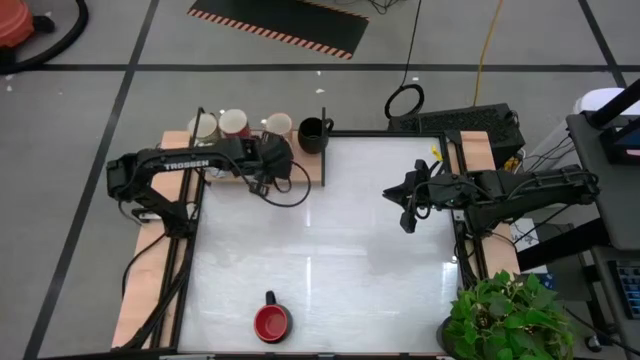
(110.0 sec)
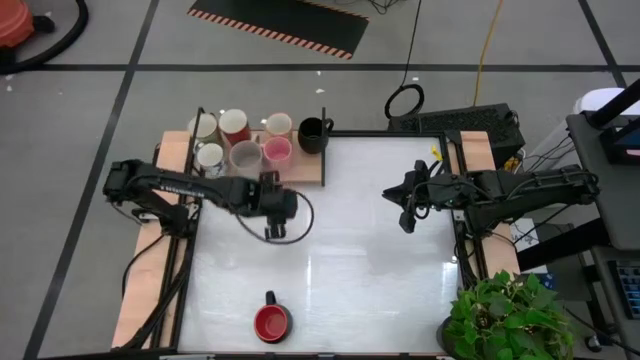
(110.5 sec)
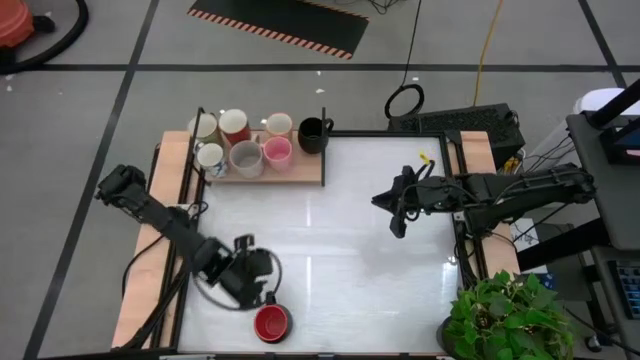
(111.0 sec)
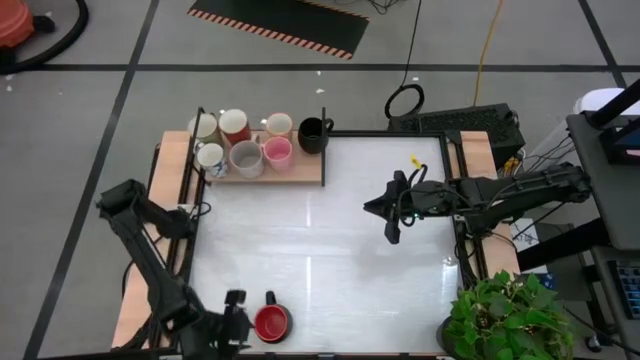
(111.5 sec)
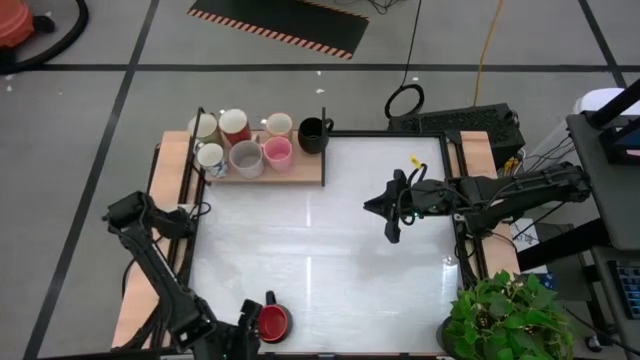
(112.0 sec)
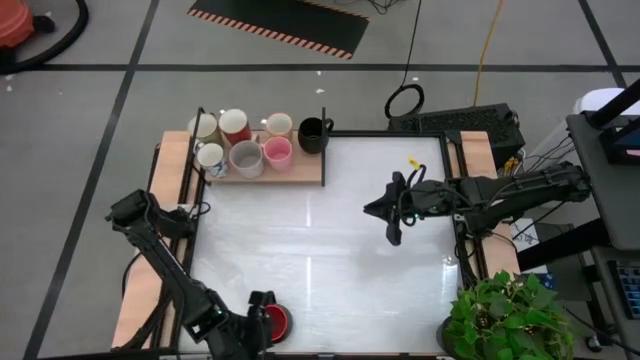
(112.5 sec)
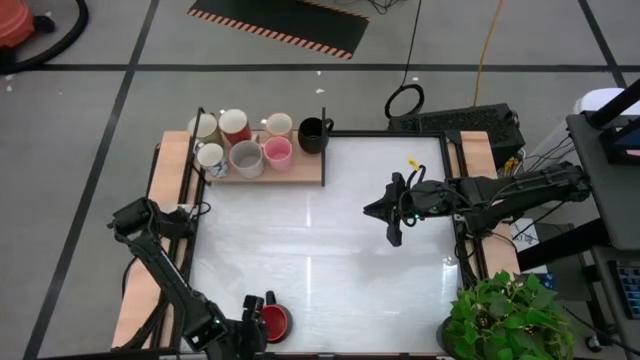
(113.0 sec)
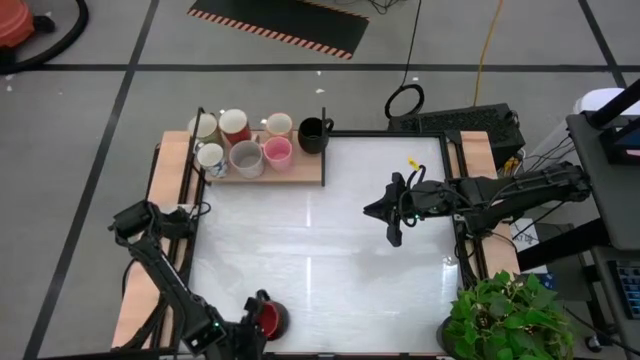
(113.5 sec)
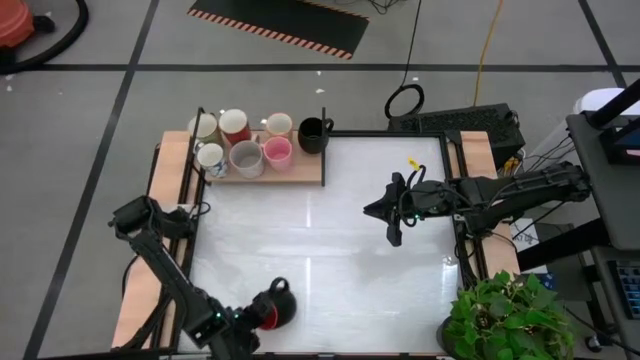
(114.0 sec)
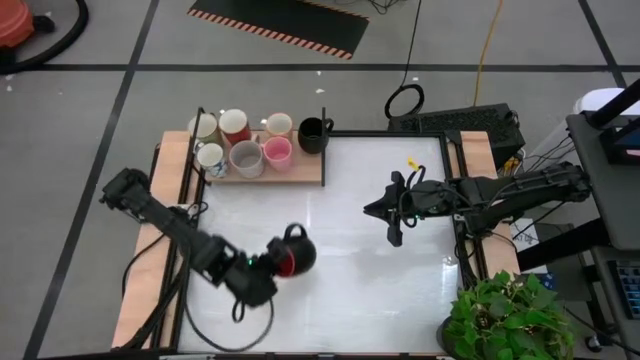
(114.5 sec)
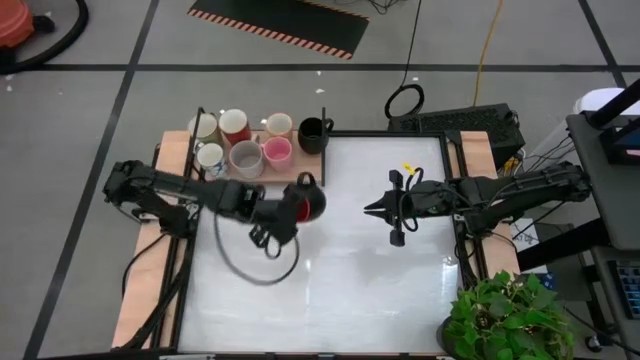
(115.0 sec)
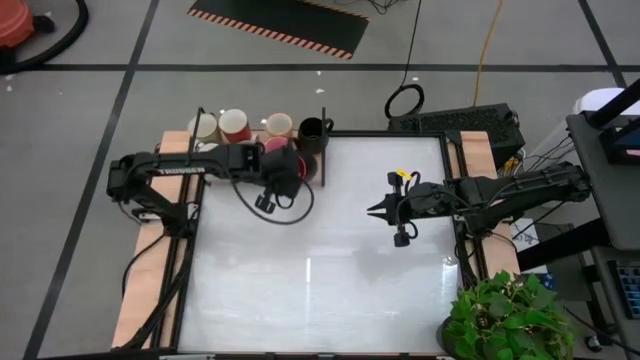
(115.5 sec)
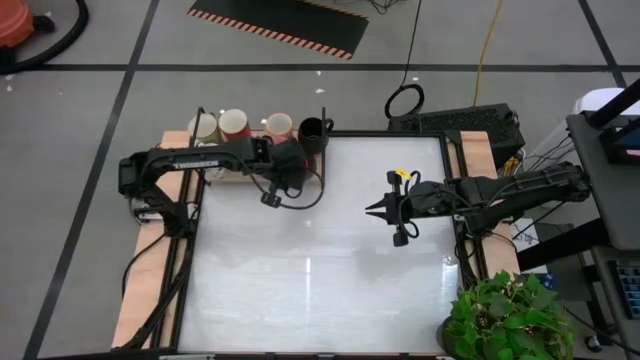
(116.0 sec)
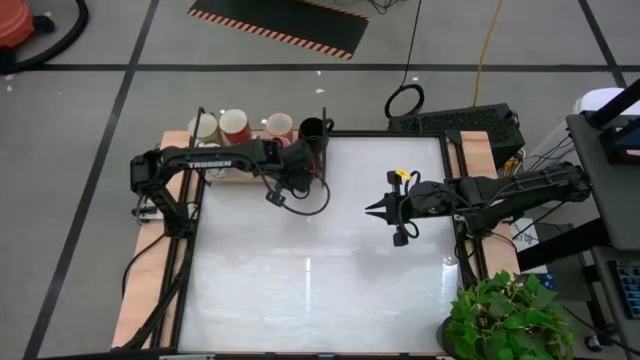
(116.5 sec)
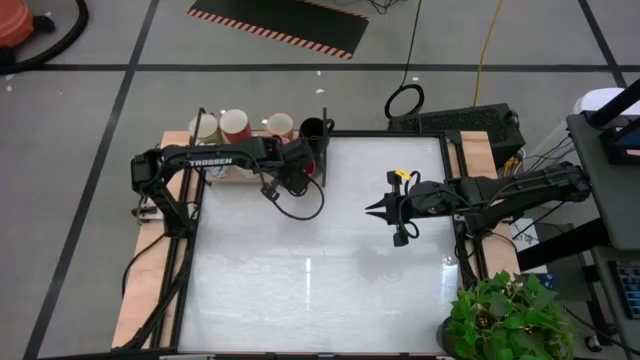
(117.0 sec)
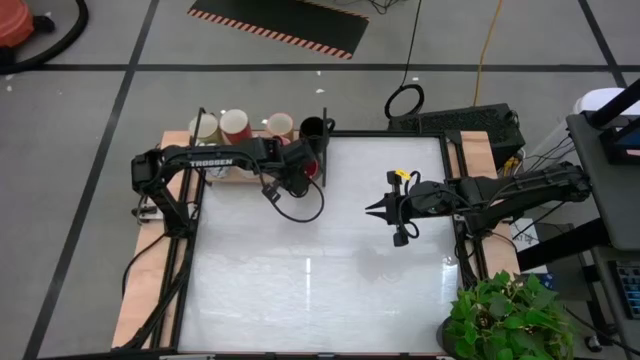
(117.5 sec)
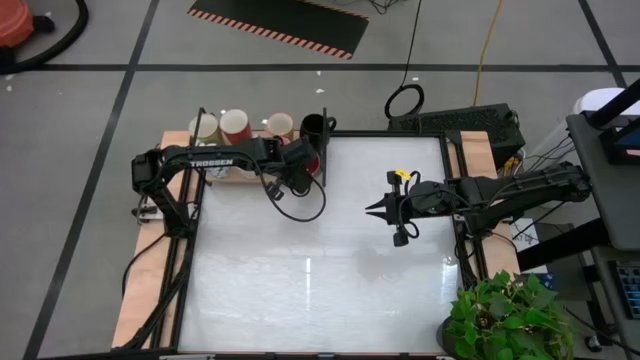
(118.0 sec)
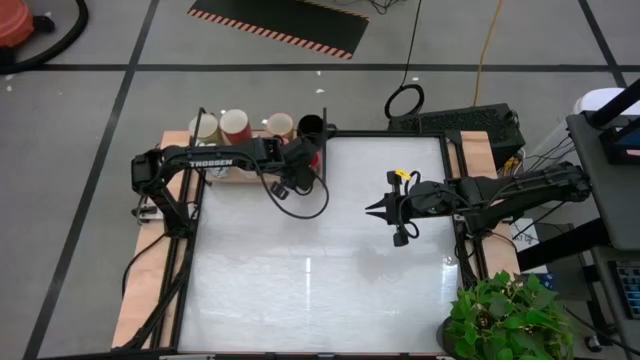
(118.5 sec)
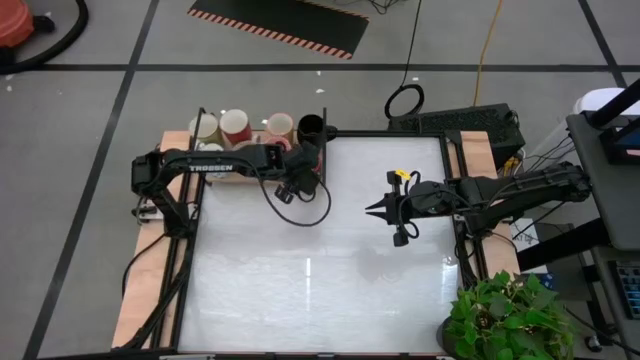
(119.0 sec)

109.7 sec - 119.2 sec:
Task: Place coffee mugs
Put the orange mug on the shelf

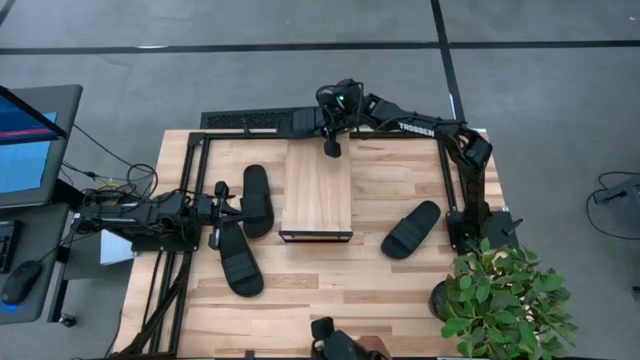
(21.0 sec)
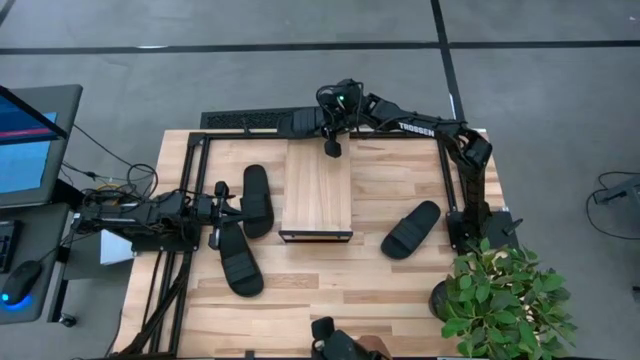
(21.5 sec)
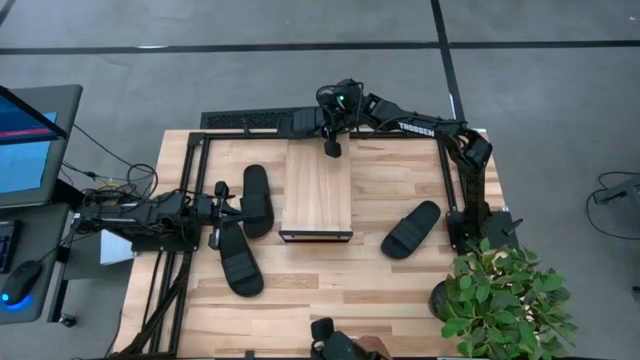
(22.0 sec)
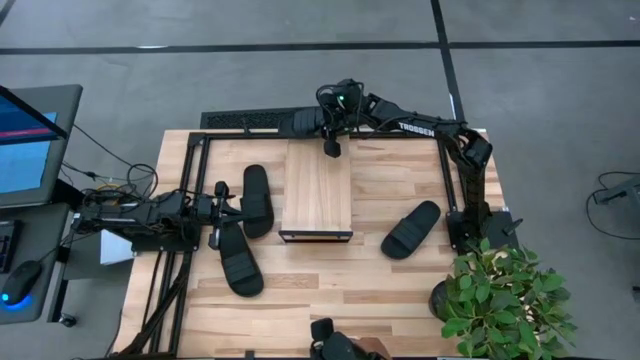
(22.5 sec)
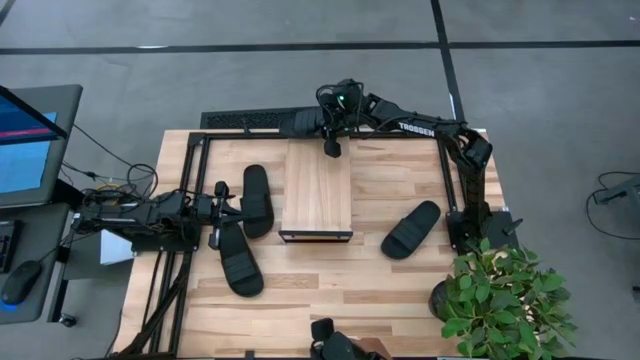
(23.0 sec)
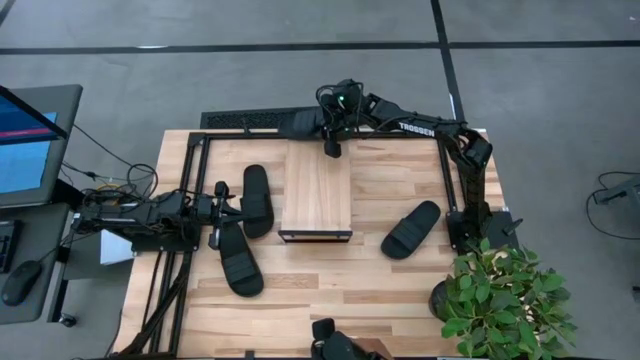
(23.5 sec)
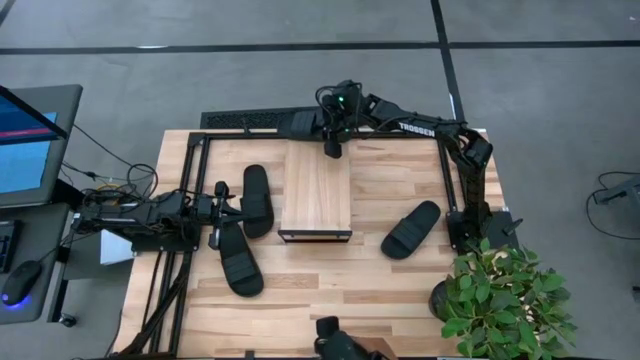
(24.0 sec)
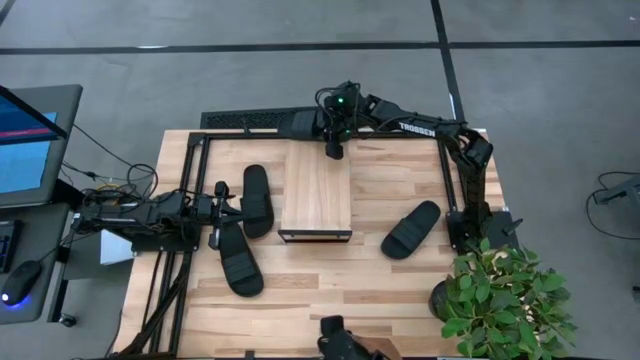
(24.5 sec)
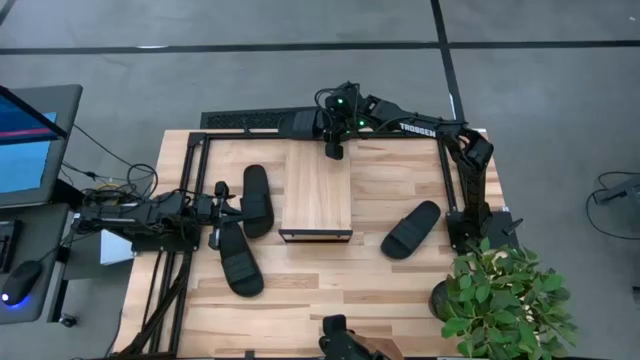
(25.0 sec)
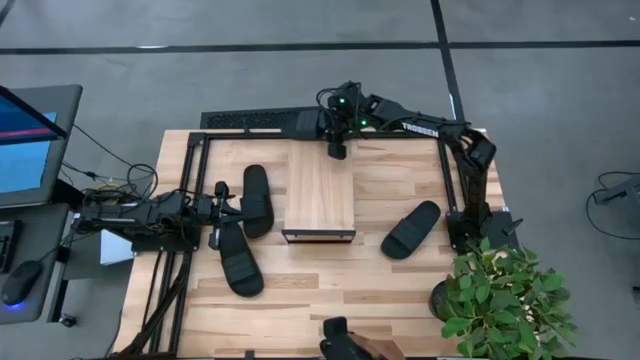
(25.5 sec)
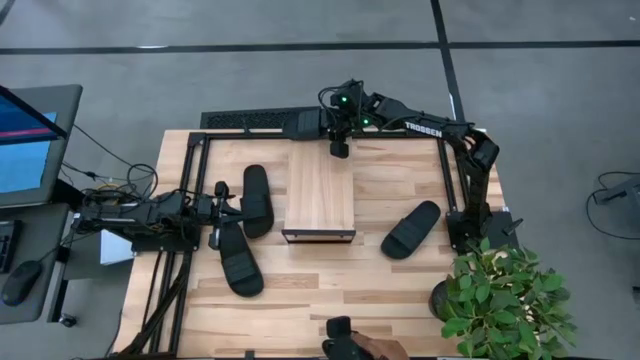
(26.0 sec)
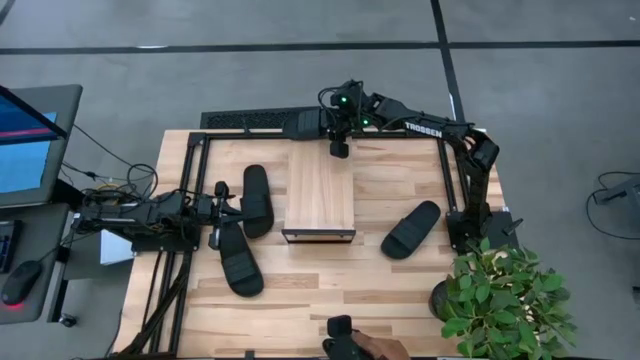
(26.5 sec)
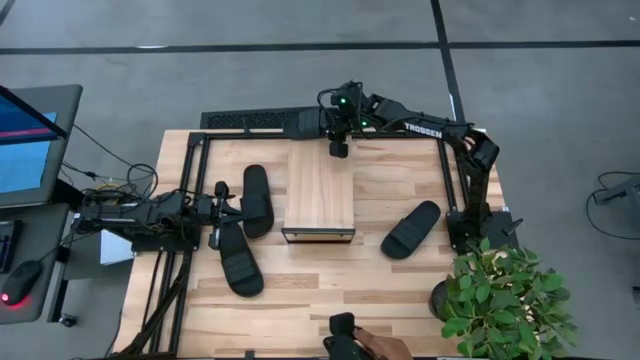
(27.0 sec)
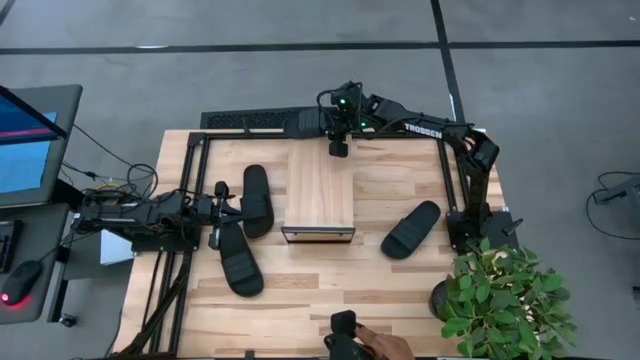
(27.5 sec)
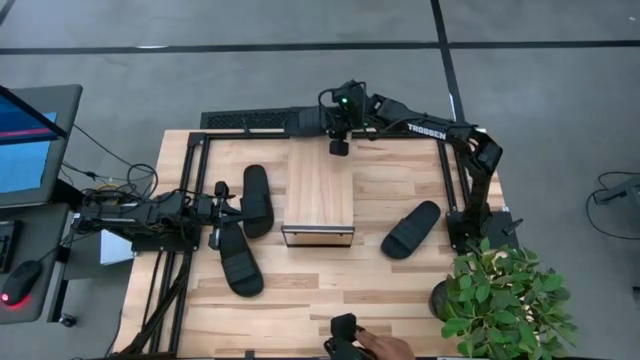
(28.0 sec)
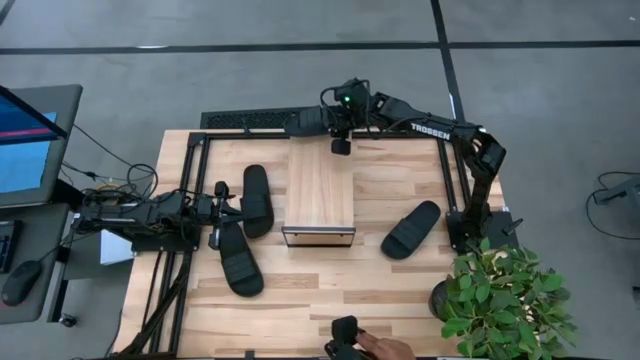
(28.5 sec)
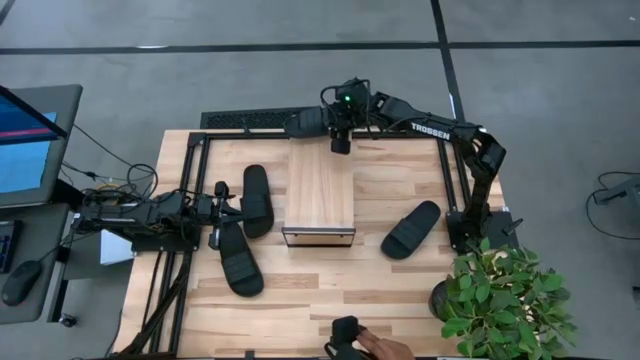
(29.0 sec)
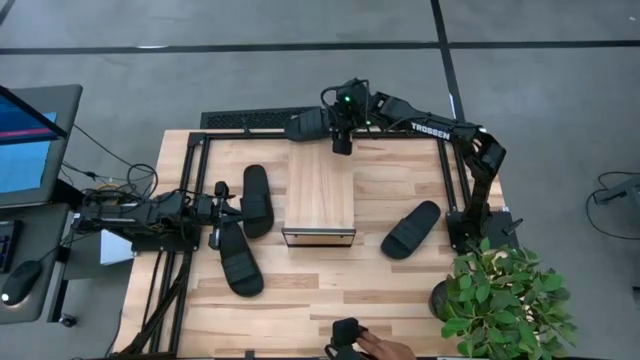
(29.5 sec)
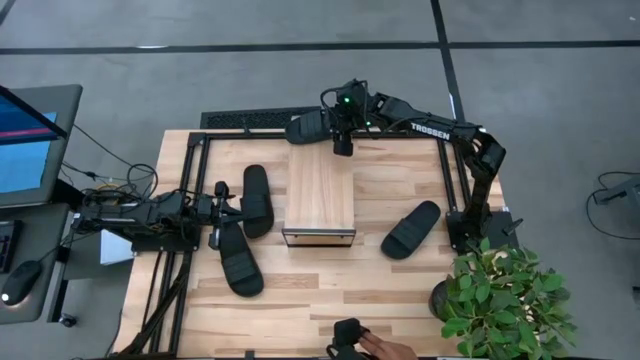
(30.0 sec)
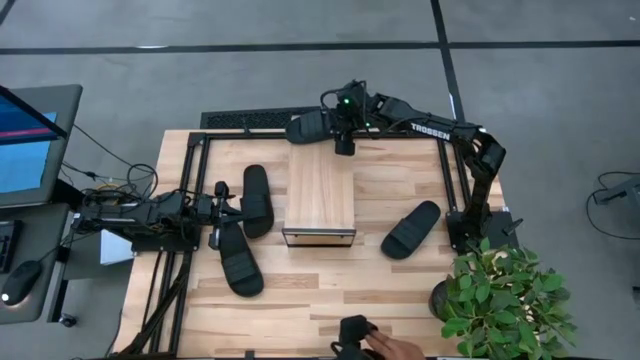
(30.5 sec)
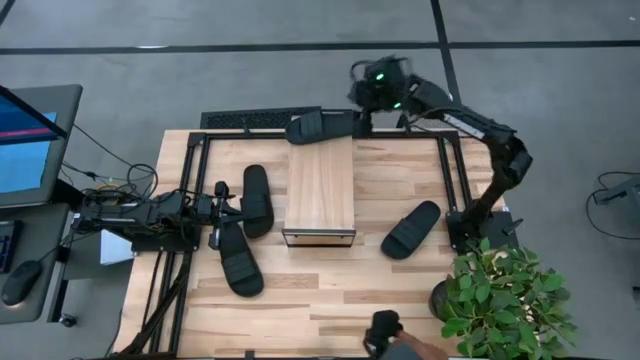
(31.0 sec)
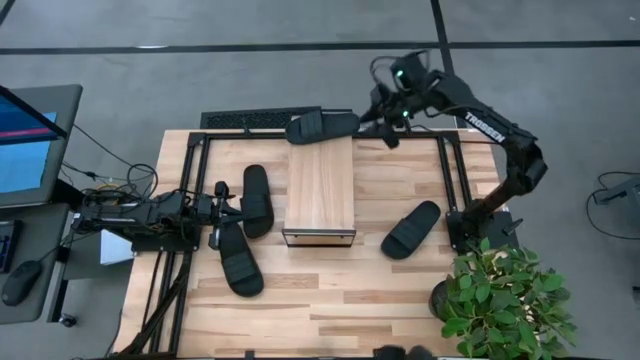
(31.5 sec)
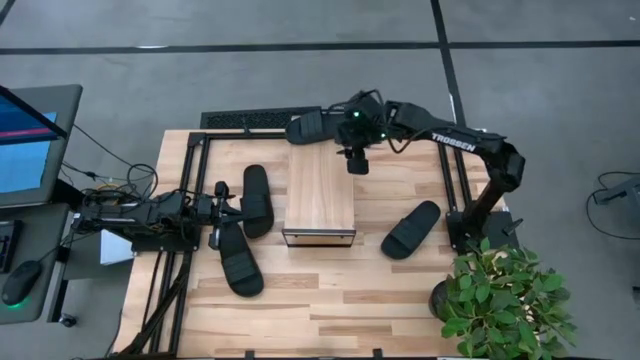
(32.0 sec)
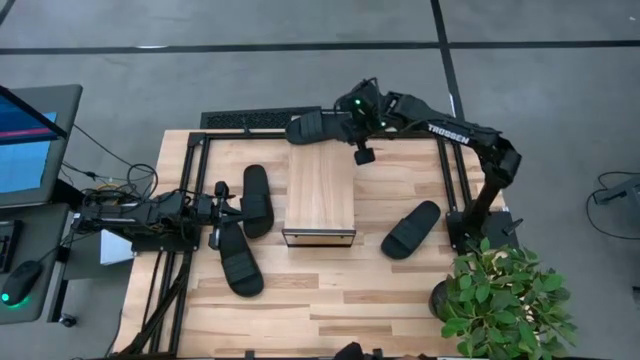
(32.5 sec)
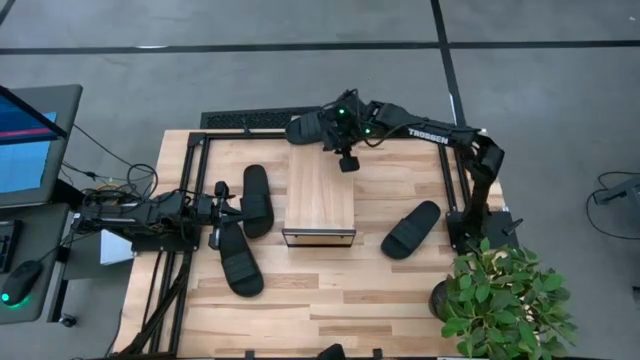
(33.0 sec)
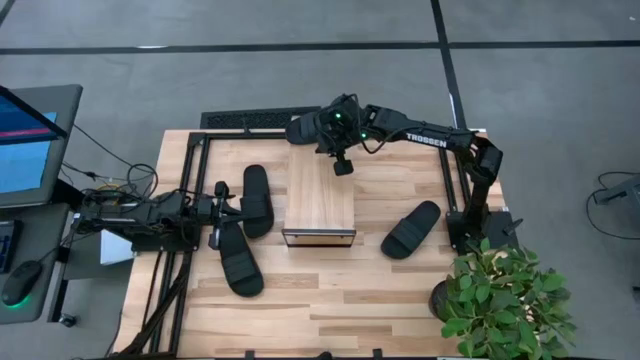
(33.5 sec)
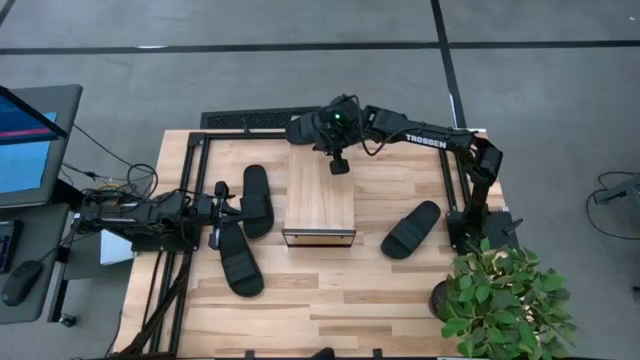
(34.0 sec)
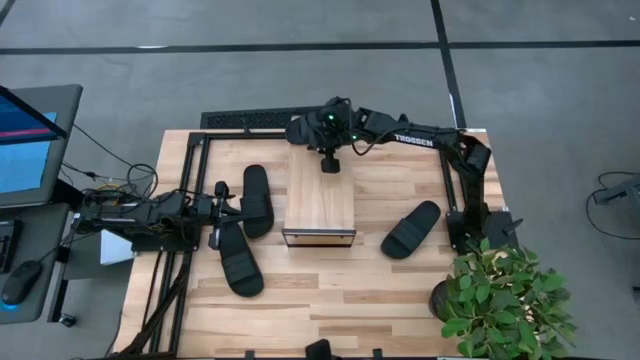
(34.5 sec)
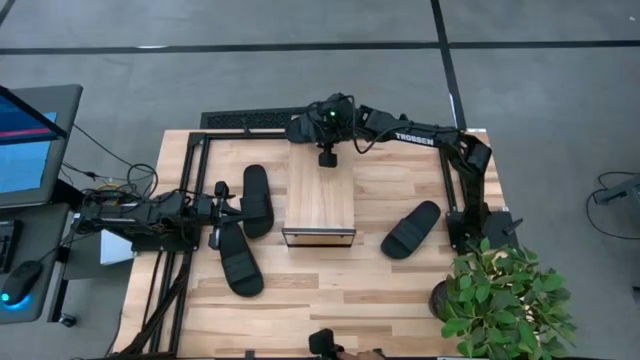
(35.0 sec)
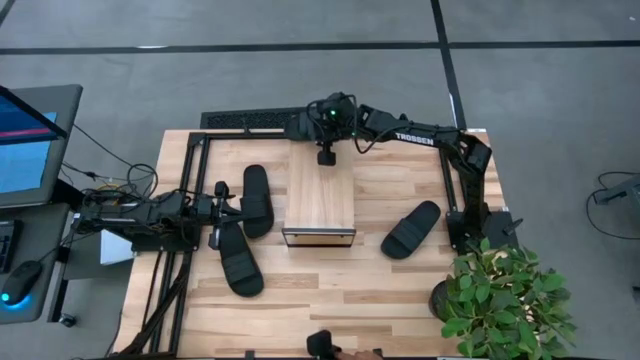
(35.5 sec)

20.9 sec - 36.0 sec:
Task: Pick and place slides into the shelf
Put the black slide on the shelf
